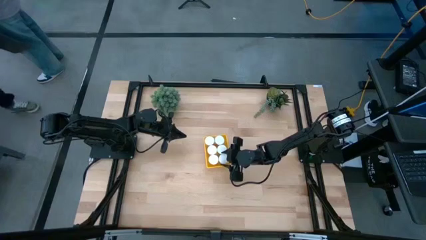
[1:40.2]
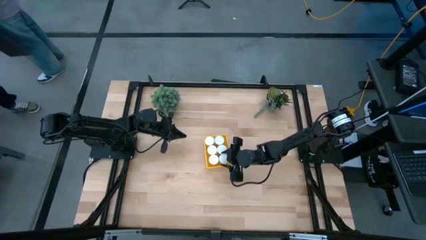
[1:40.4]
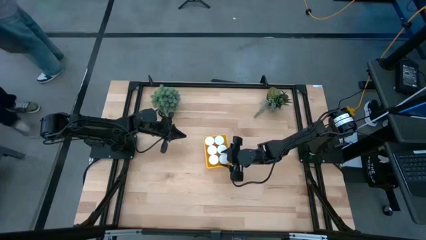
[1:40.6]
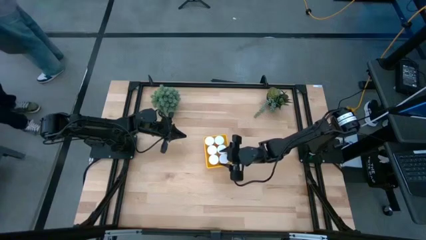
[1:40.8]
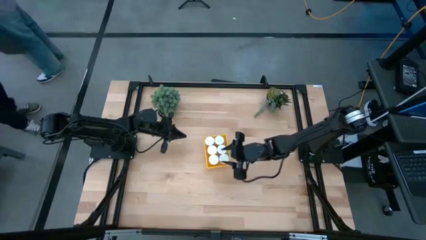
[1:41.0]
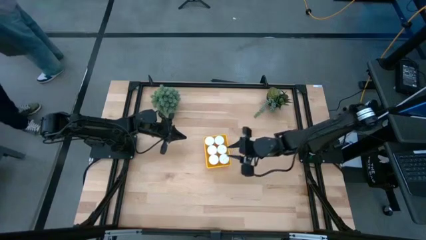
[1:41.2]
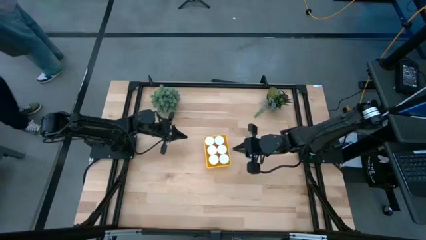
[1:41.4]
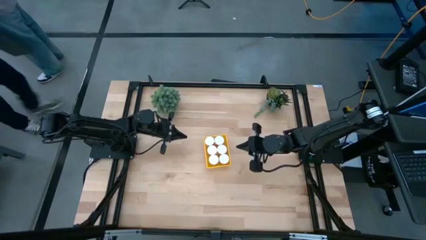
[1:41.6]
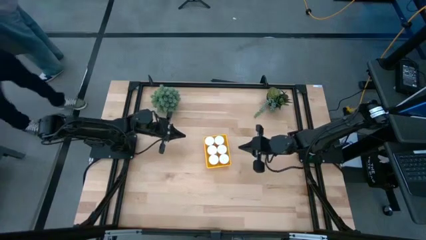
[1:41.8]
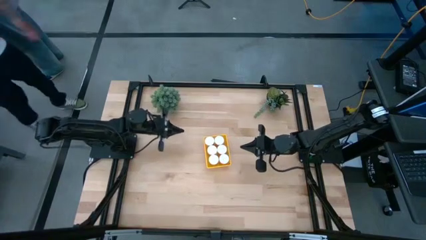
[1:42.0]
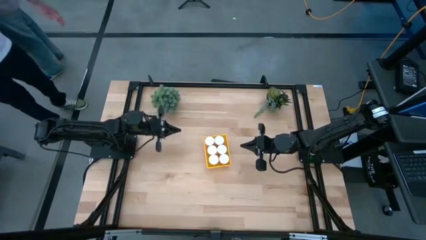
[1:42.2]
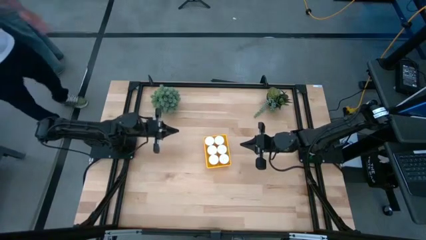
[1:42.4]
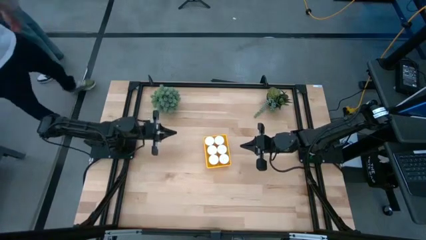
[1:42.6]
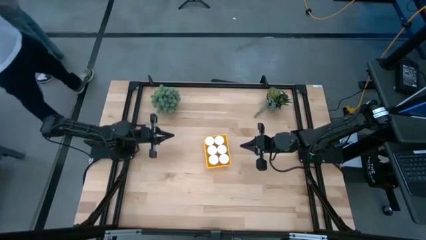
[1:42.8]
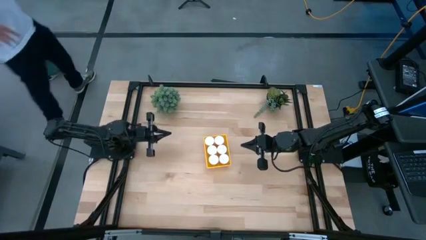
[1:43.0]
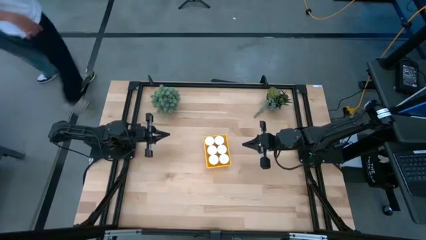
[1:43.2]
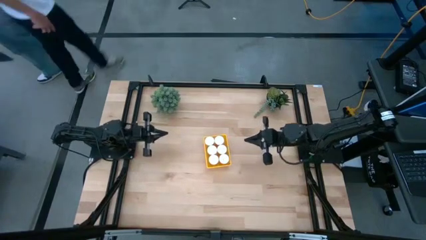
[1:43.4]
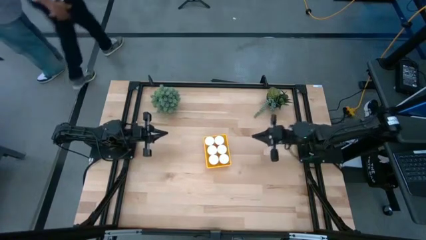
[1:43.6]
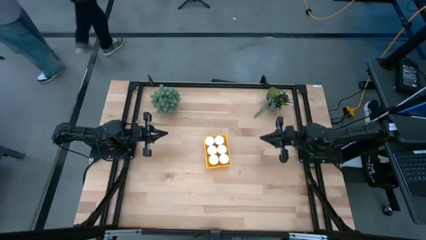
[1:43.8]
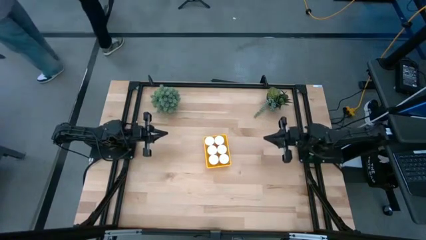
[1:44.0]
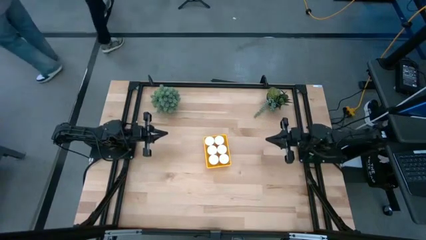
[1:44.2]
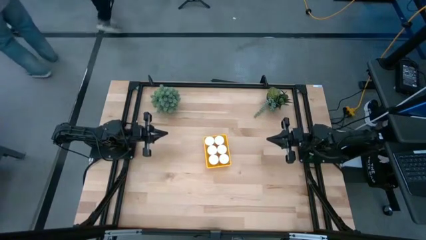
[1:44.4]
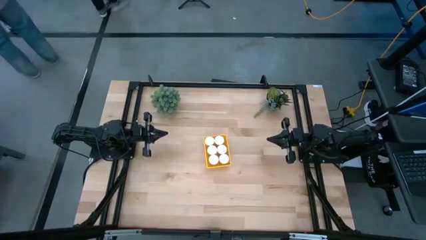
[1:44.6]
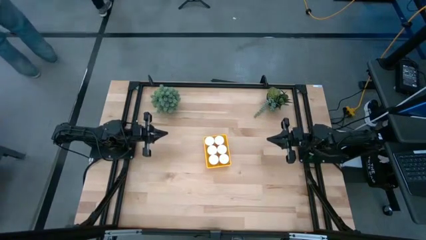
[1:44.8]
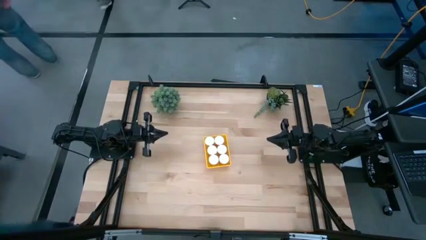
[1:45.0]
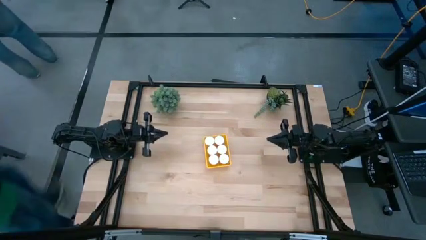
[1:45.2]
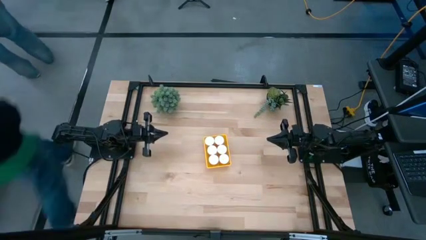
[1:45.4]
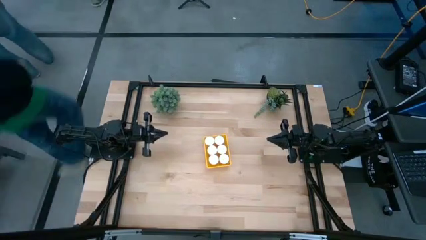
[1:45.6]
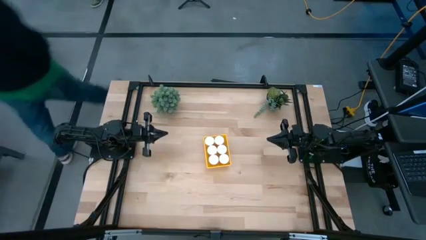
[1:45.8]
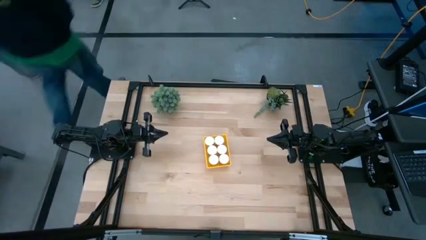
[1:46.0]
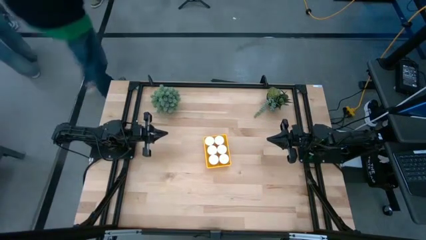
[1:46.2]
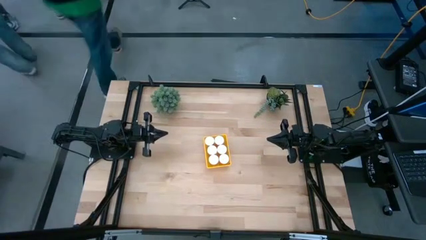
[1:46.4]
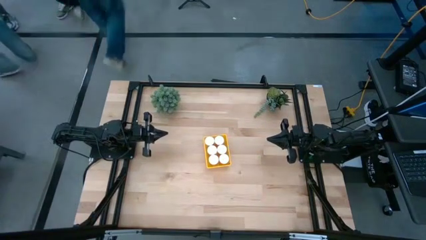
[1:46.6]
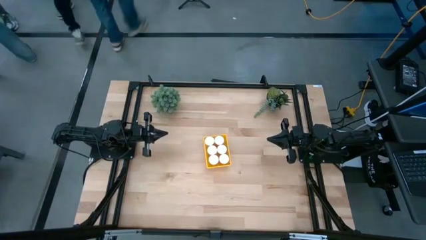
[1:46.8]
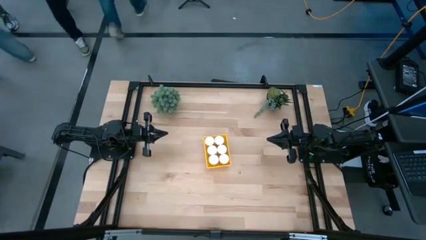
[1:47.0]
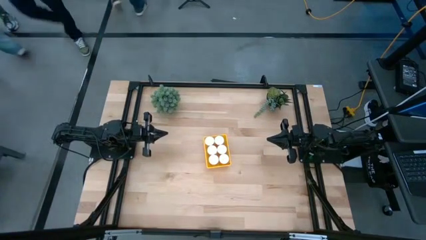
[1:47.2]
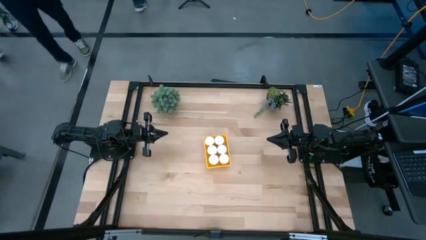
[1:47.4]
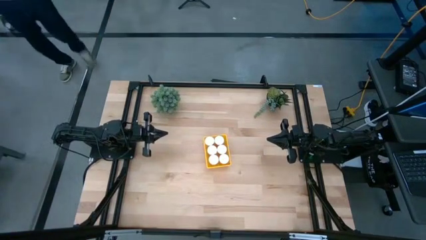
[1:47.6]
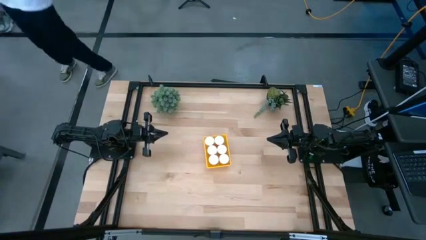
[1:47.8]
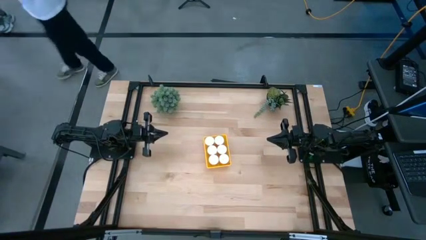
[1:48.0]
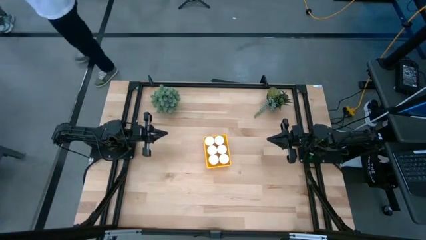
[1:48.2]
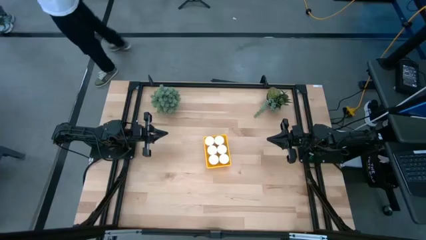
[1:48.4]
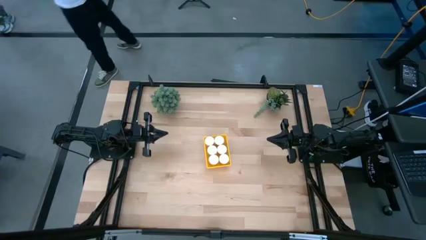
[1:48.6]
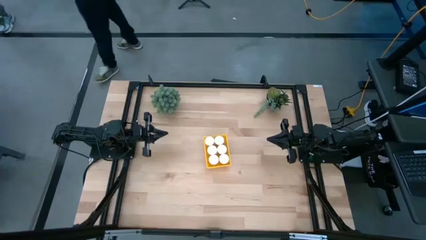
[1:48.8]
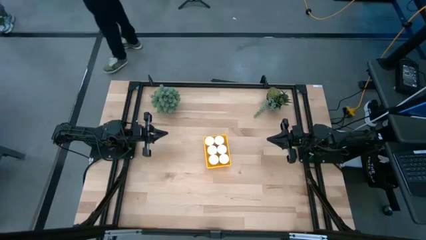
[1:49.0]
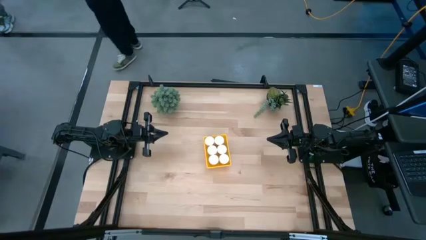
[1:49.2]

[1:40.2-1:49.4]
Task: Pick and place pill bottles into a basket
Return to Home Position

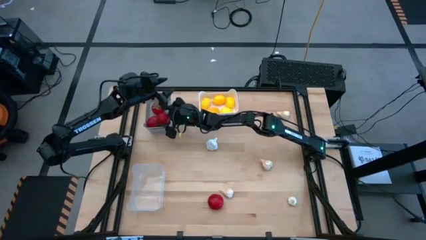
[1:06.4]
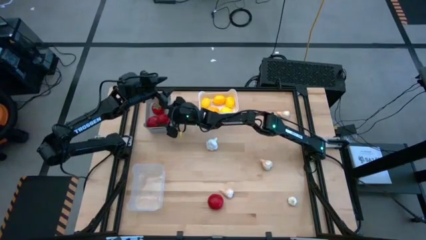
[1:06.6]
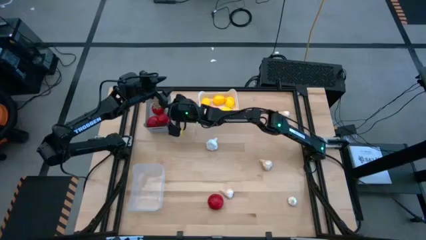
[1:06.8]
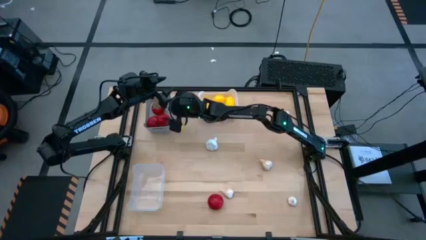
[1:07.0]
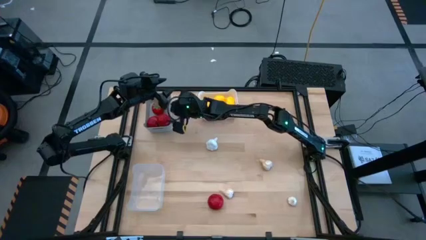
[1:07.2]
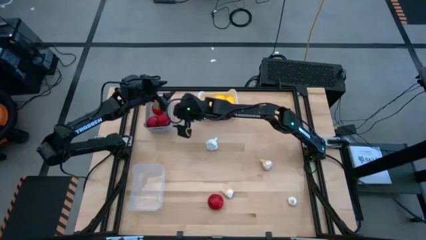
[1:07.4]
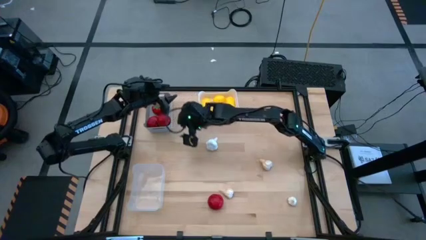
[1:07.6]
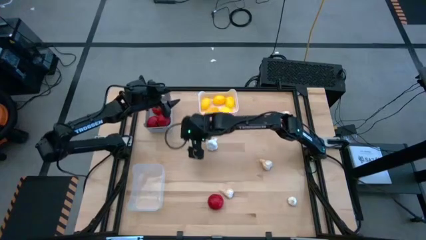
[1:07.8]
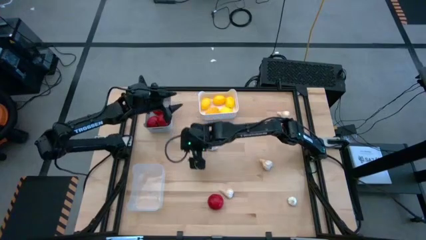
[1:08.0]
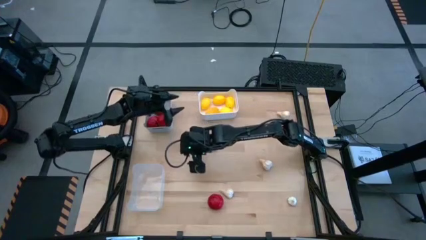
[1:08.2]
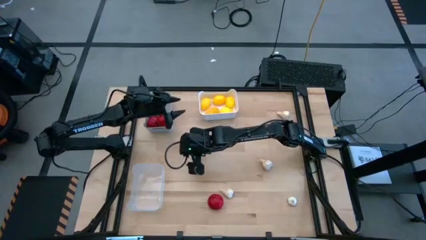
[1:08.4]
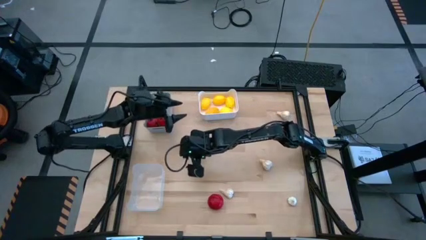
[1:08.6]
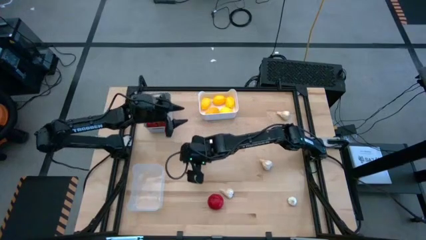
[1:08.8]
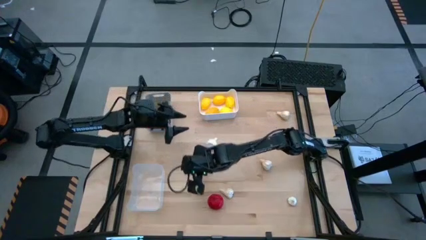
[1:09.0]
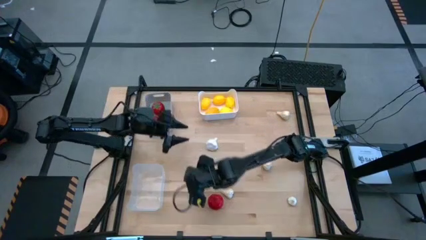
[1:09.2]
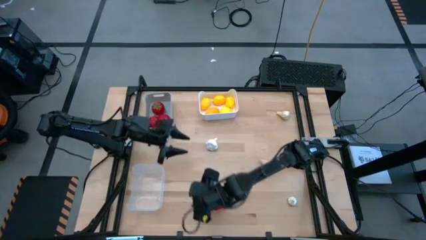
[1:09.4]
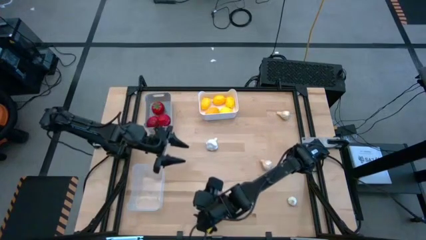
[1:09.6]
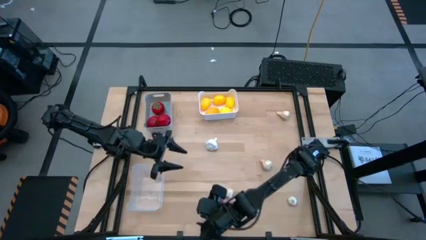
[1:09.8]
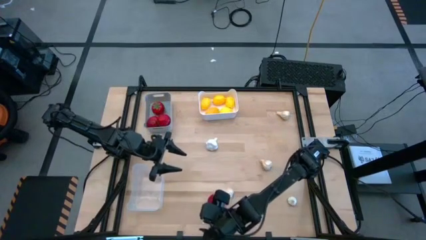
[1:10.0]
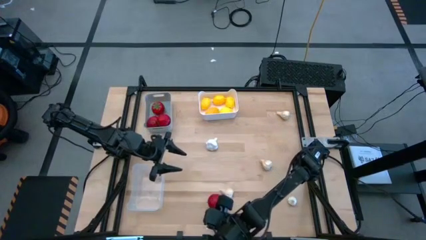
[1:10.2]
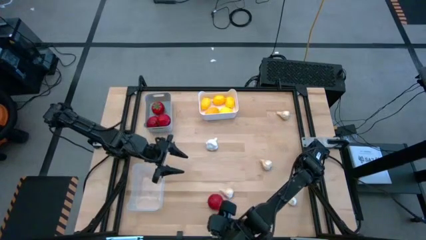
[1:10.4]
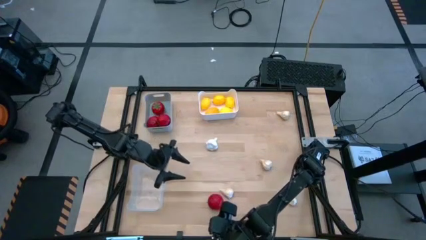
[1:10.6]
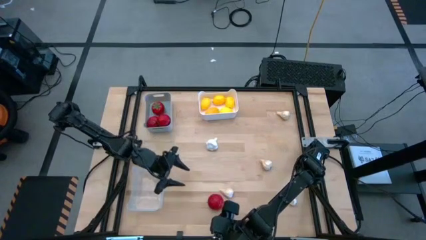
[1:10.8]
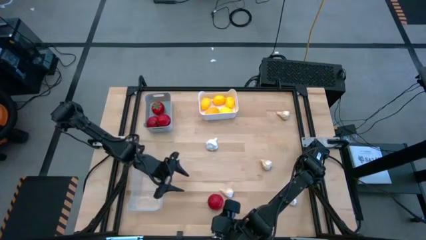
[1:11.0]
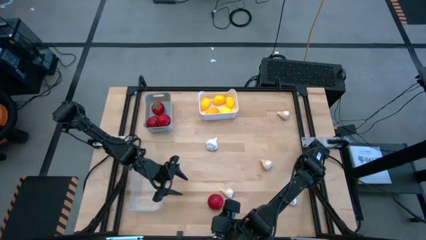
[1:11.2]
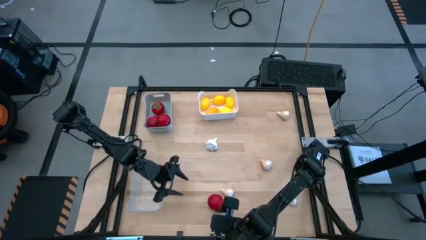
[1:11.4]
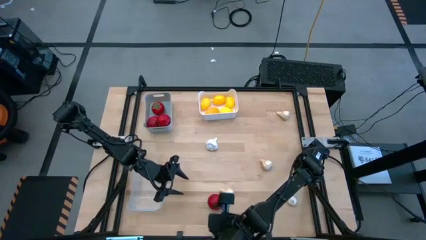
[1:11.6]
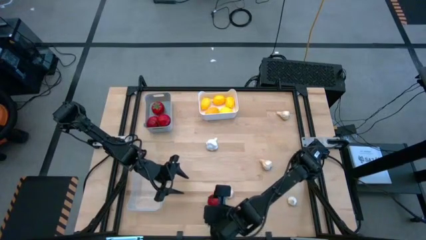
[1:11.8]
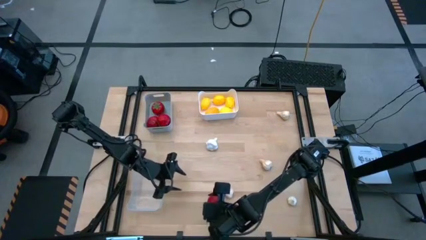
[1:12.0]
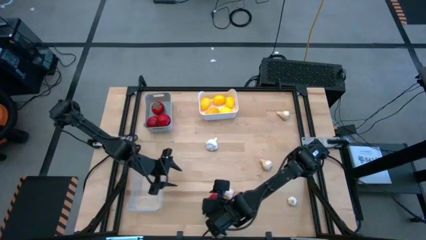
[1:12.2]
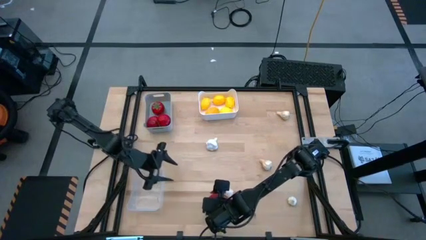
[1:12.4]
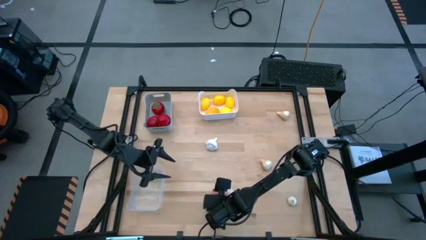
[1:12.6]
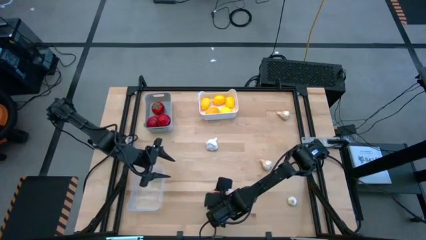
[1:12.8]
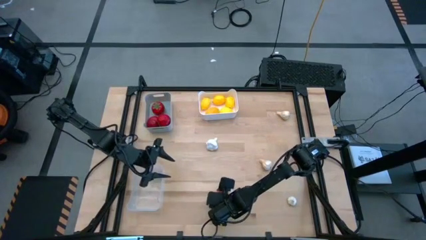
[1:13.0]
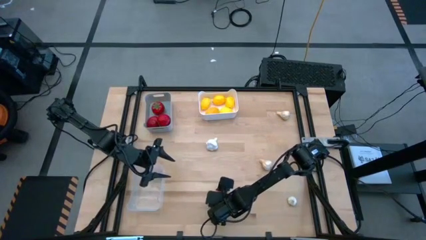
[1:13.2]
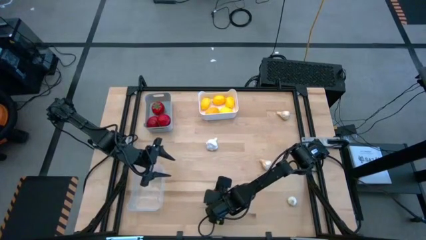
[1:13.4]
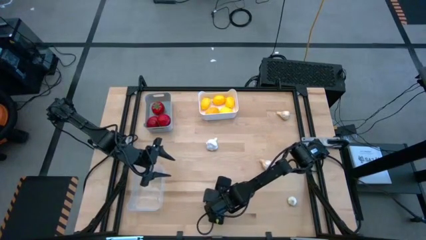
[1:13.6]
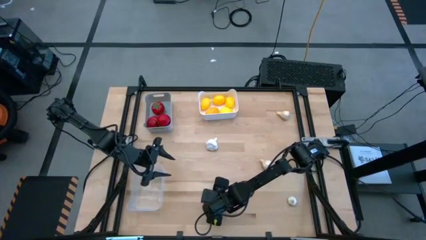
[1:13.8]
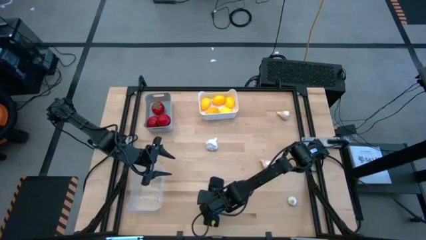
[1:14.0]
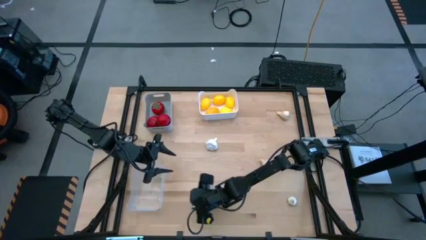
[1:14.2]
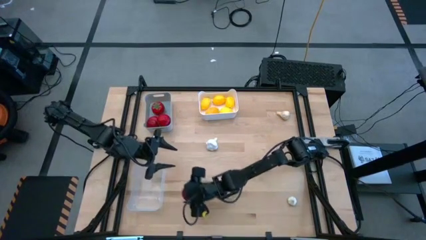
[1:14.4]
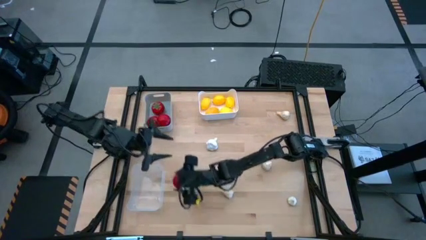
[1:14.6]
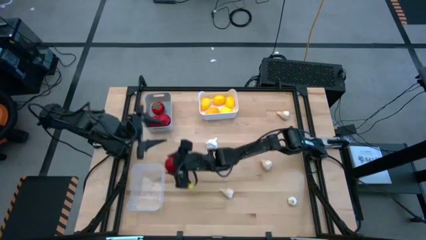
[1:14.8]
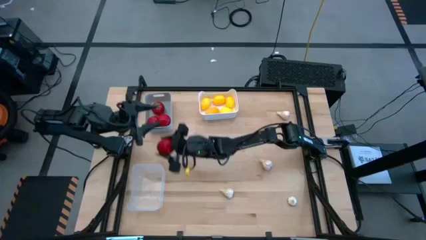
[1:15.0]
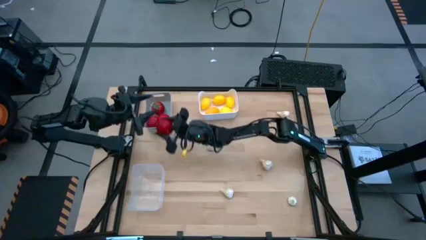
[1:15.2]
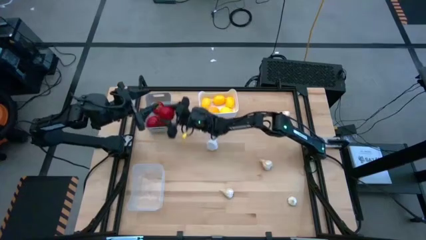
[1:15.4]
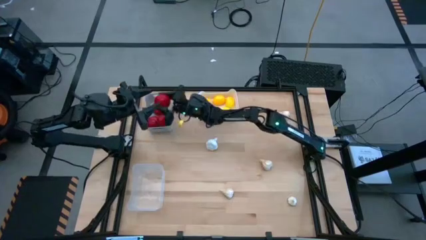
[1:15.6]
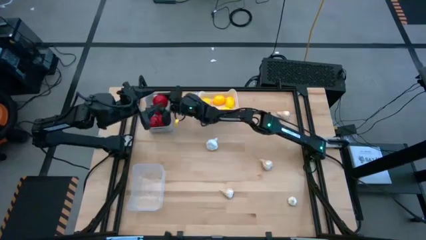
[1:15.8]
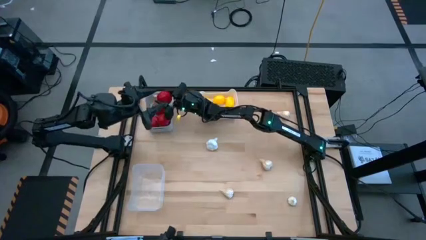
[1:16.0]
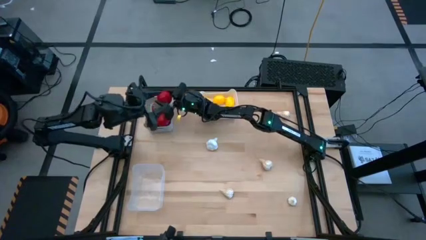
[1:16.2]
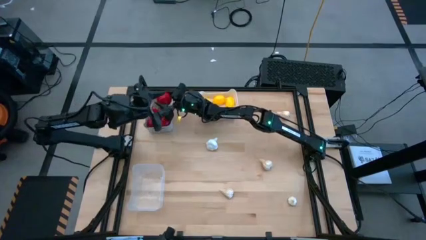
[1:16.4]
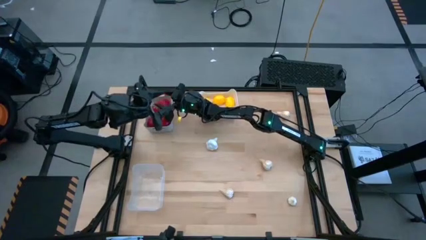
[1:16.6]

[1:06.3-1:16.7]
Task: Sort produce into baskets
Put the tomato into the gray bin
